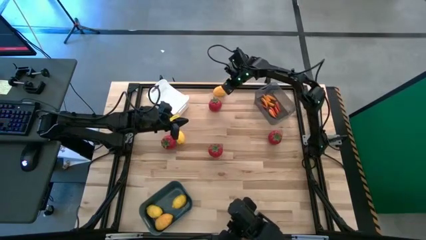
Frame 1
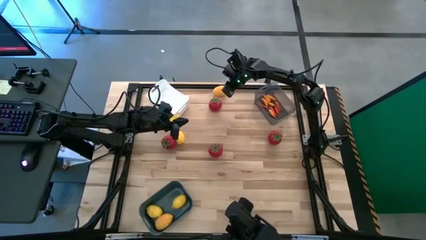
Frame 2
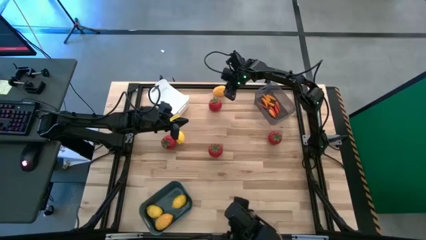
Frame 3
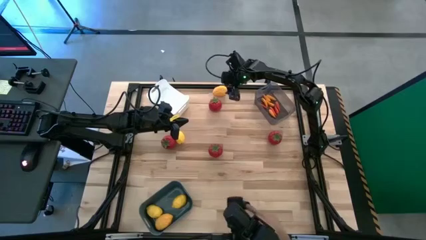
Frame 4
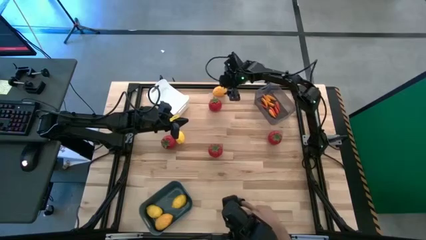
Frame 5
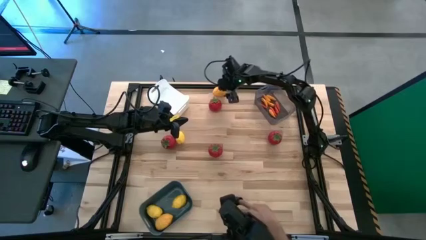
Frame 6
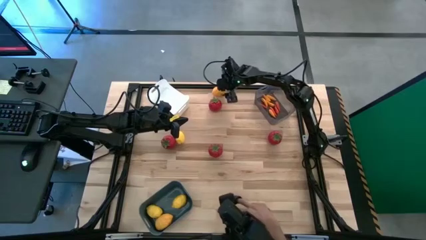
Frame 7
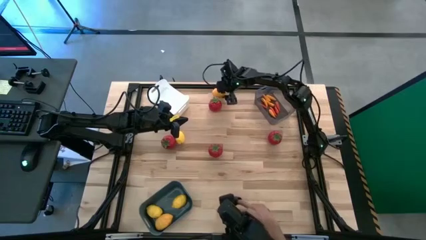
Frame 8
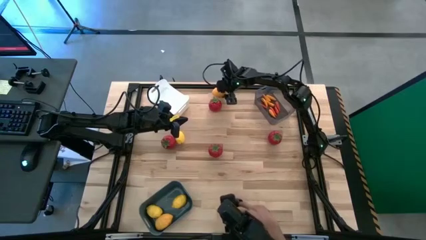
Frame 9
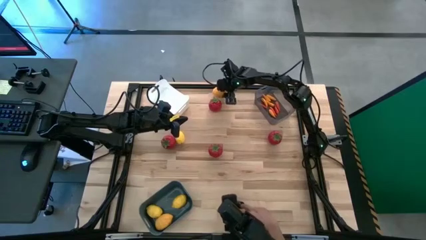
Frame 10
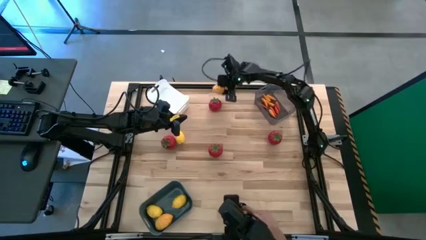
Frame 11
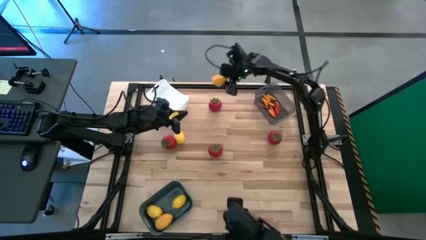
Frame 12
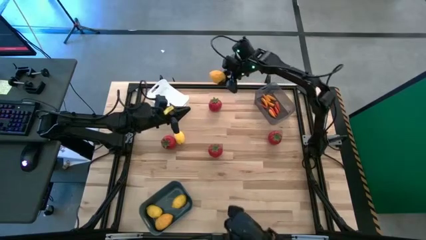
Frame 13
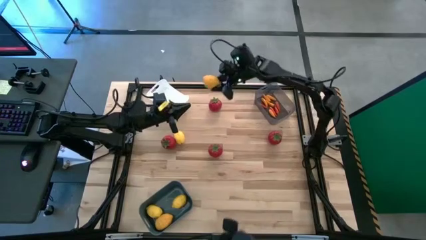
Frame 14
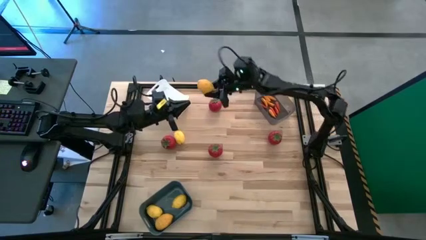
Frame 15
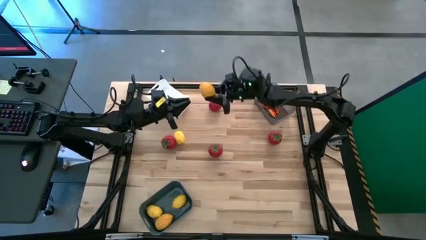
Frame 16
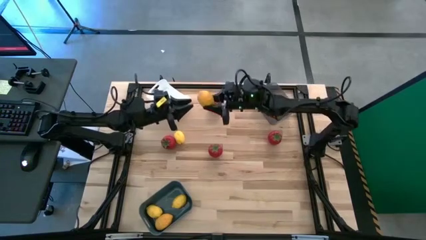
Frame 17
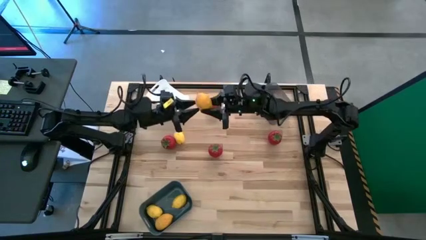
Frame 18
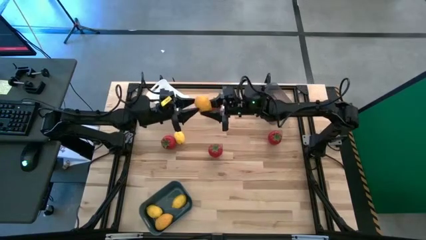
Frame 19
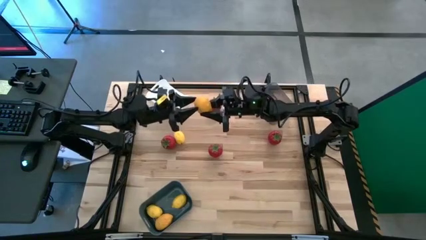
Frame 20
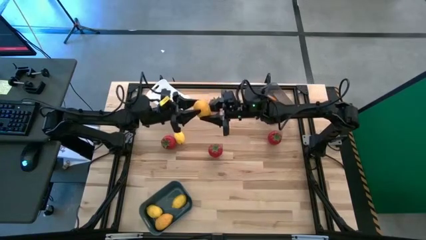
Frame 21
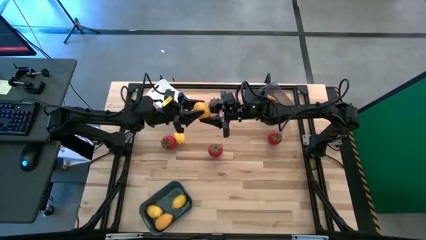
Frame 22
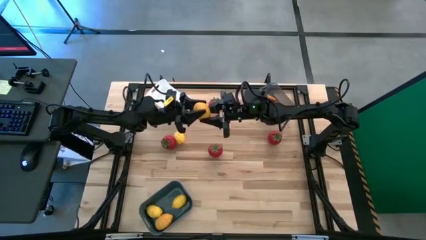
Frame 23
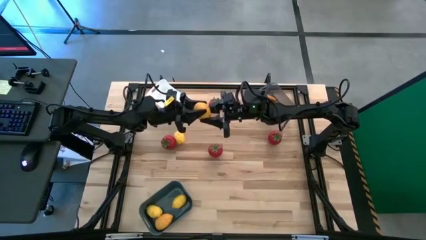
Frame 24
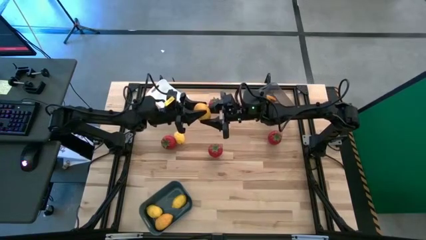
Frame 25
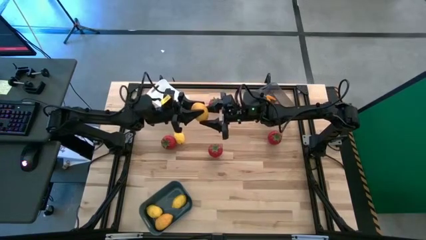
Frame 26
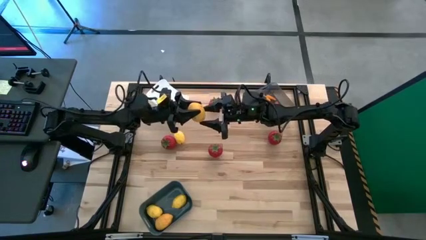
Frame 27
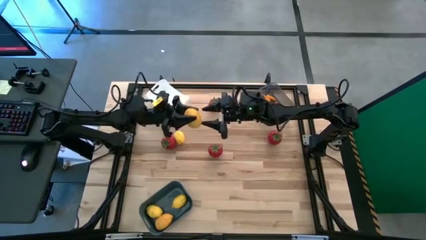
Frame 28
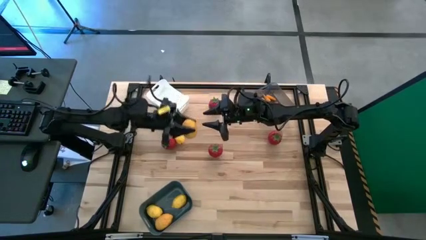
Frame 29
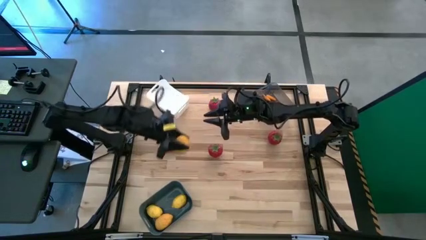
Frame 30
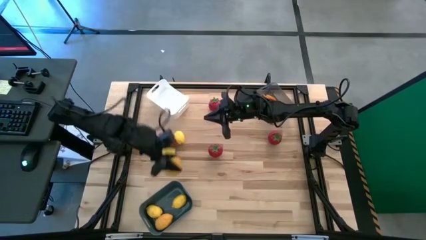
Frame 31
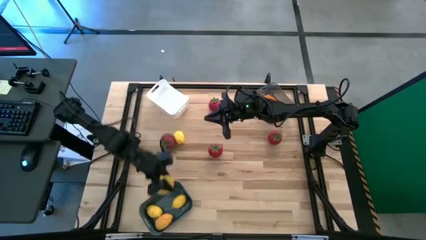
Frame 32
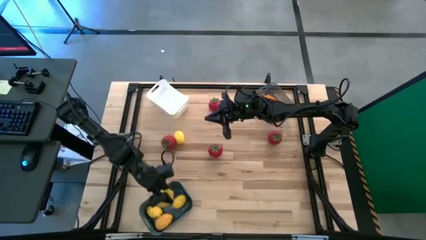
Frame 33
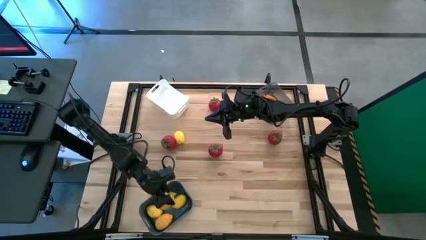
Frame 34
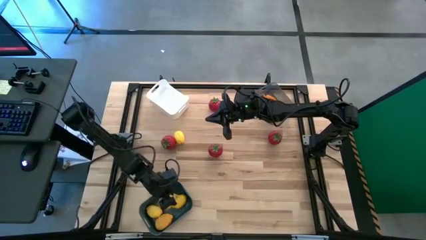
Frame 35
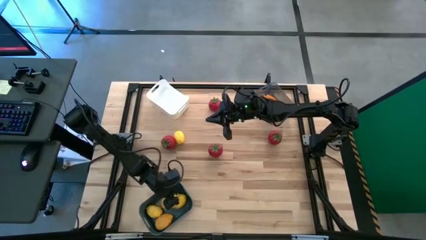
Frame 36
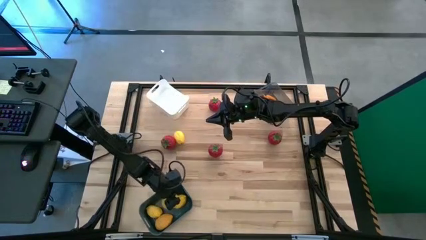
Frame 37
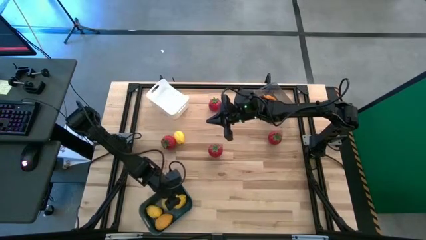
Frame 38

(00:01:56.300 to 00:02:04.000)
Task: Sort produce into baskets
Put the lemon into the blue bin

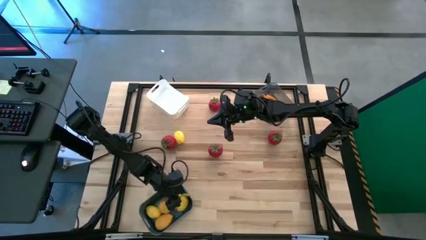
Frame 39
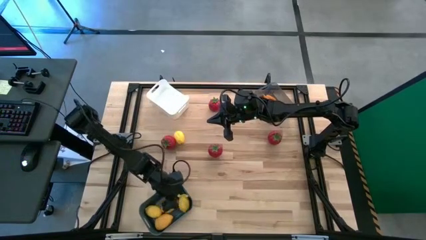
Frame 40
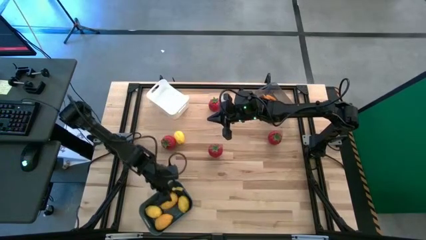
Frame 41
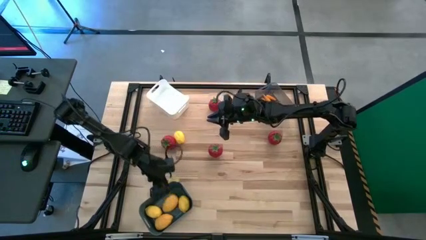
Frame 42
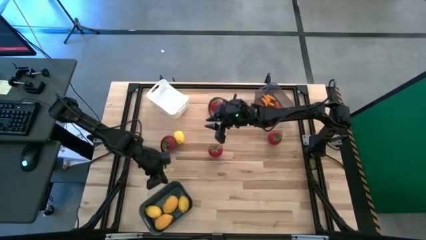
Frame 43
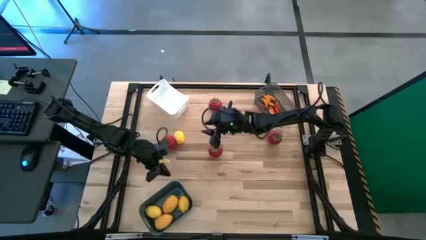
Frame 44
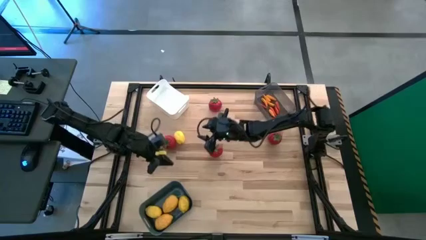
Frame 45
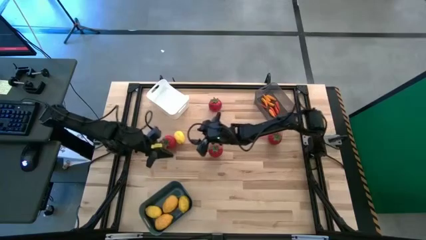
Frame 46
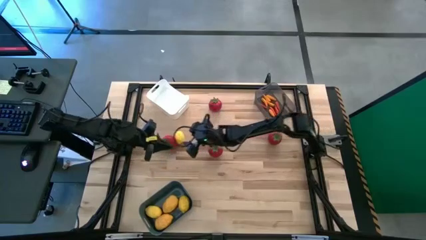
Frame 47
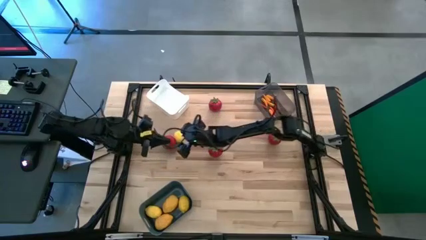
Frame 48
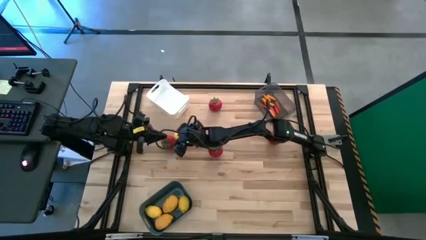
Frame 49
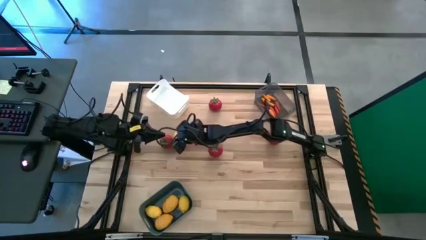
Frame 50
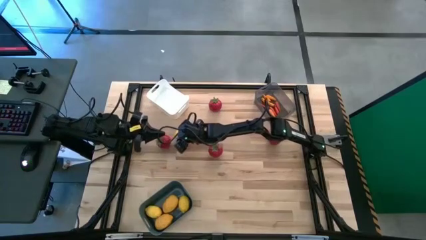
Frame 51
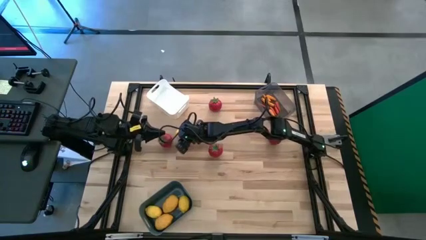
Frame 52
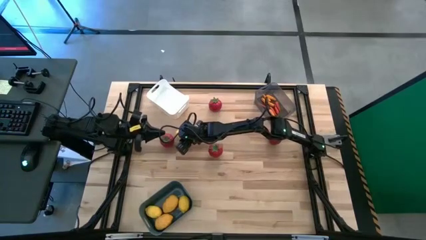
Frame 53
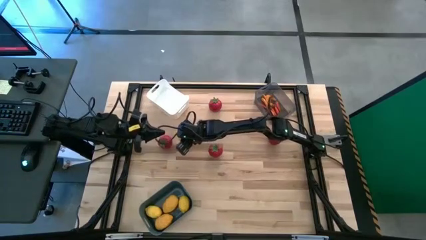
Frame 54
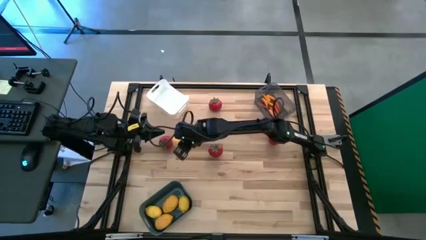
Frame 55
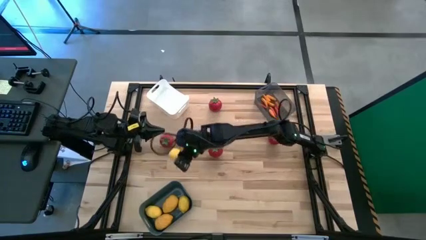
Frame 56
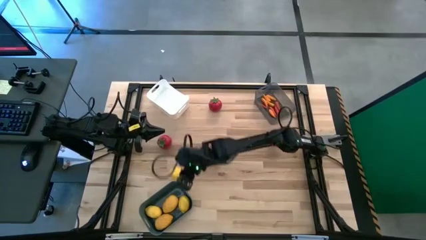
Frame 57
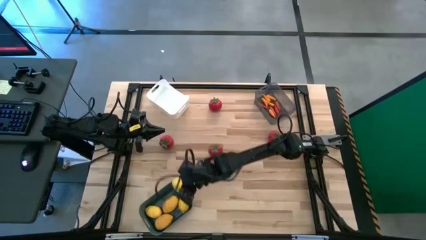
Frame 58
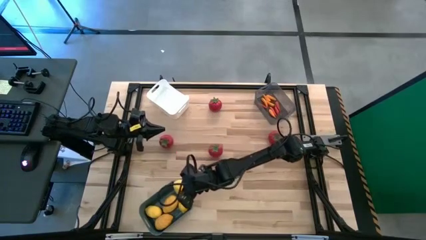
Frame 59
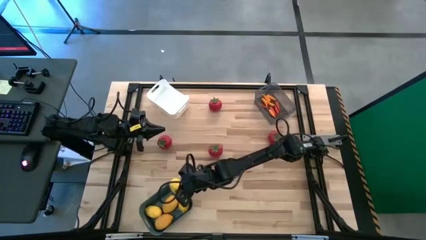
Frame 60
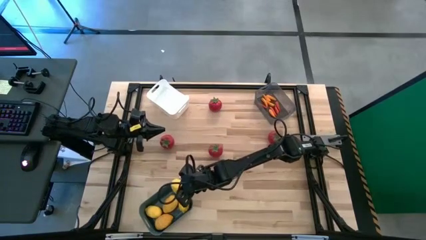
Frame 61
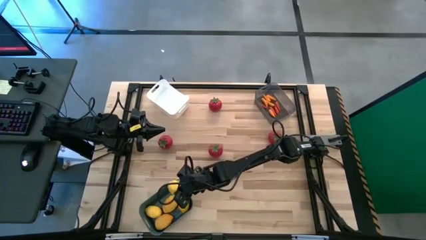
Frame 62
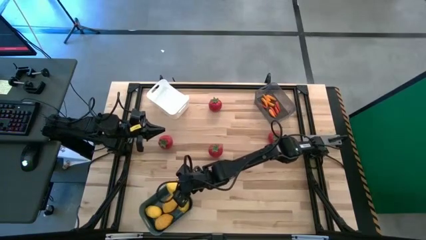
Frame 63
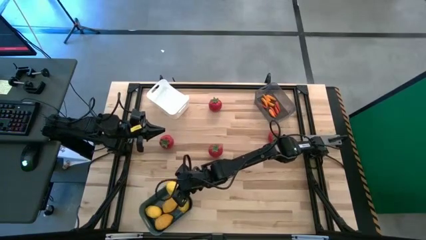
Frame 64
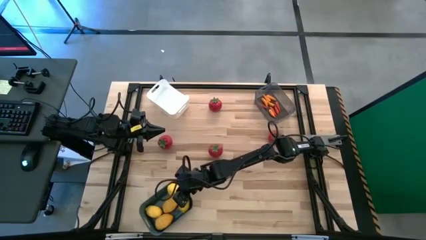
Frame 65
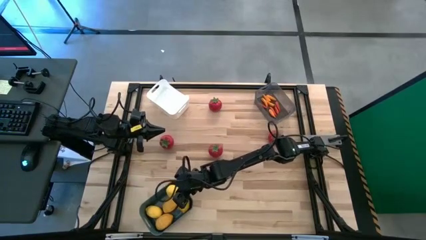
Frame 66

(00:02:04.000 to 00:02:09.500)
Put the lemon into the blue bin
